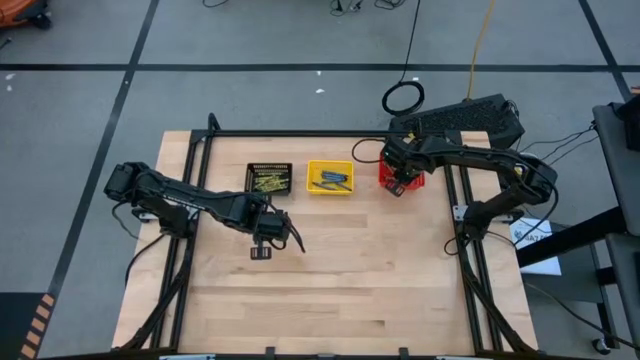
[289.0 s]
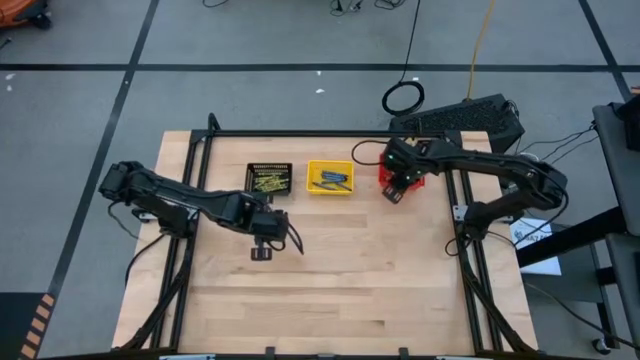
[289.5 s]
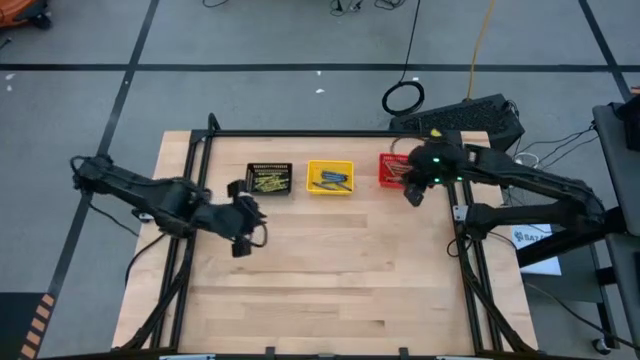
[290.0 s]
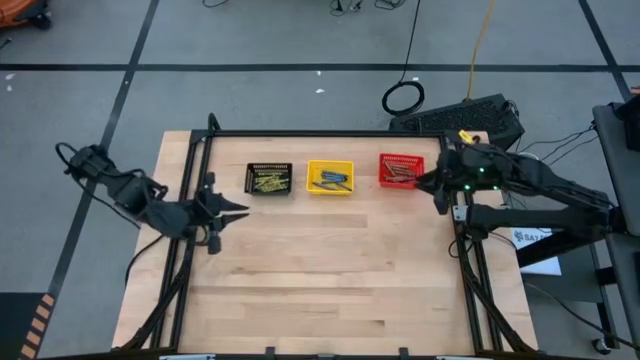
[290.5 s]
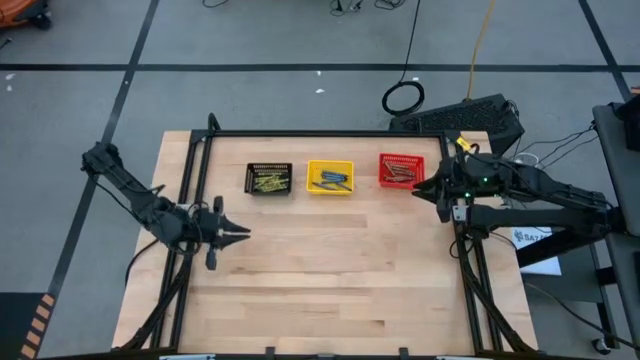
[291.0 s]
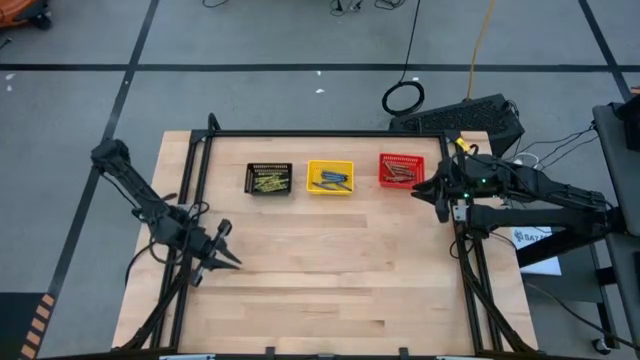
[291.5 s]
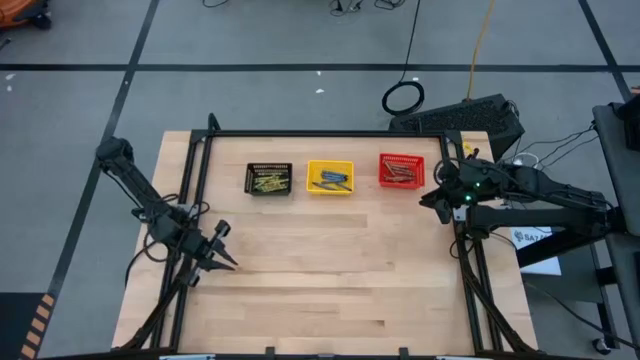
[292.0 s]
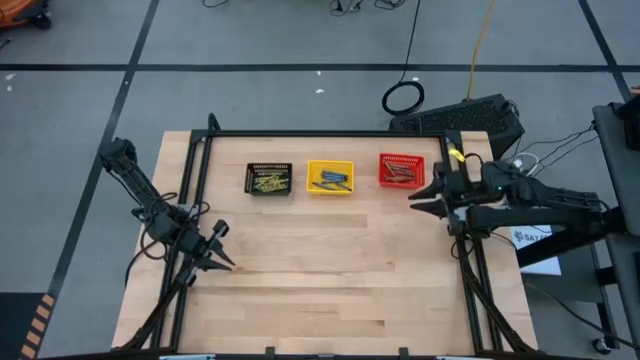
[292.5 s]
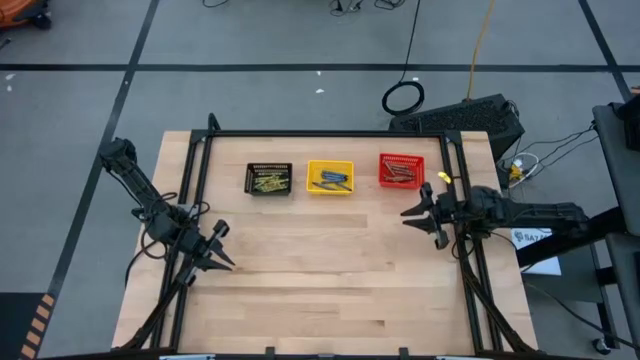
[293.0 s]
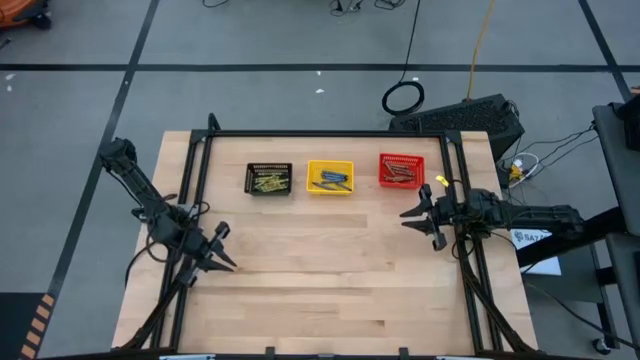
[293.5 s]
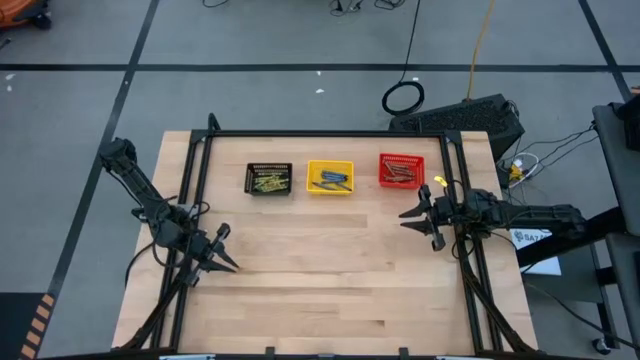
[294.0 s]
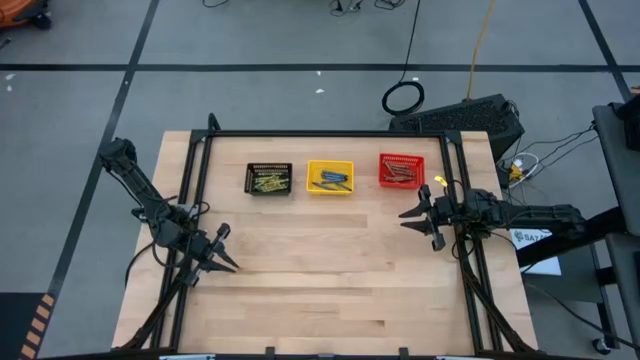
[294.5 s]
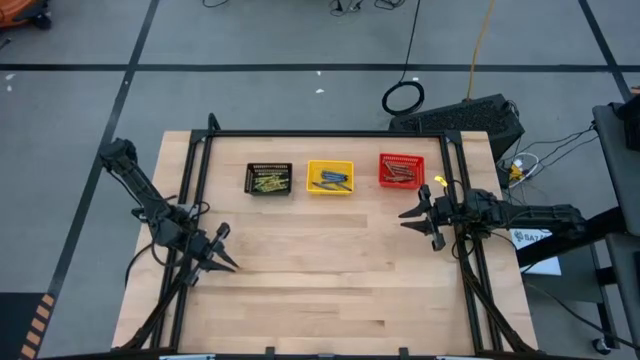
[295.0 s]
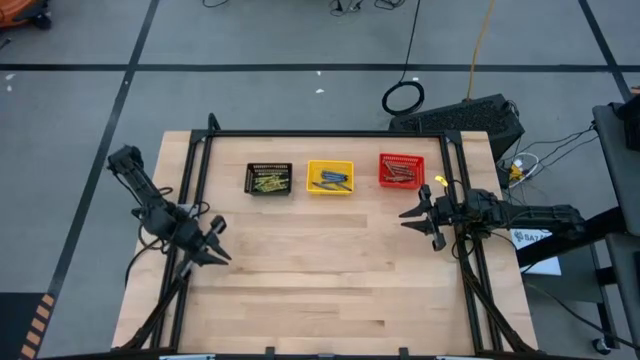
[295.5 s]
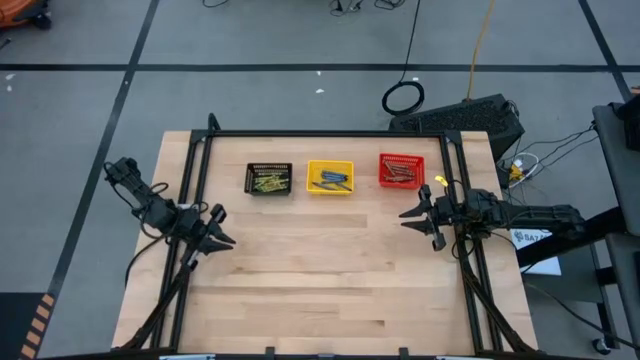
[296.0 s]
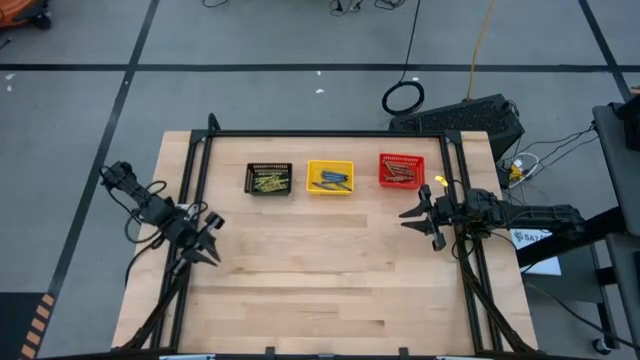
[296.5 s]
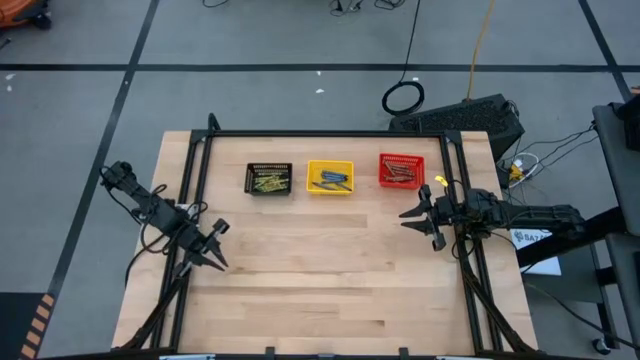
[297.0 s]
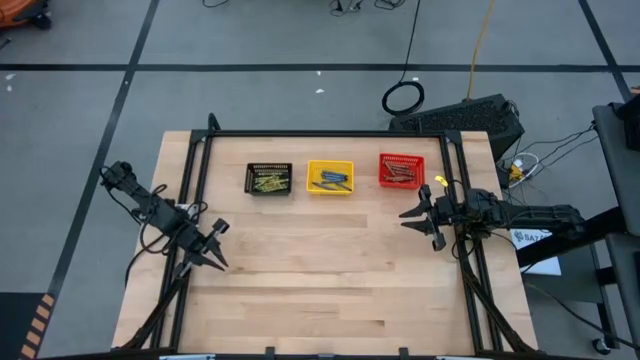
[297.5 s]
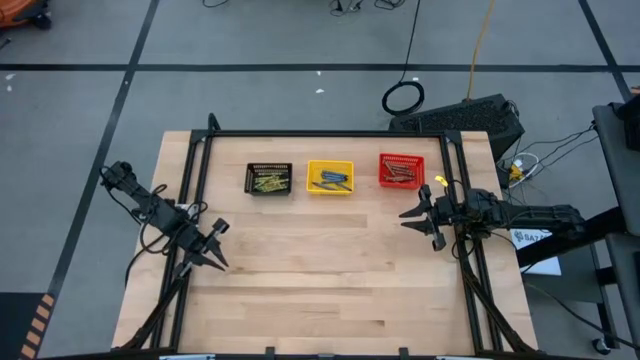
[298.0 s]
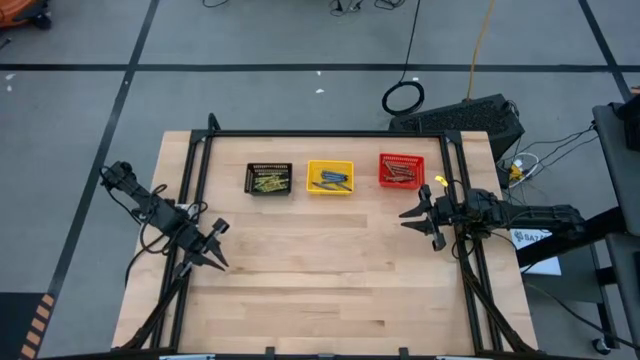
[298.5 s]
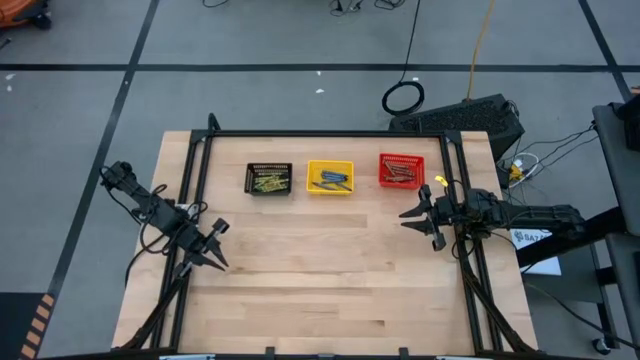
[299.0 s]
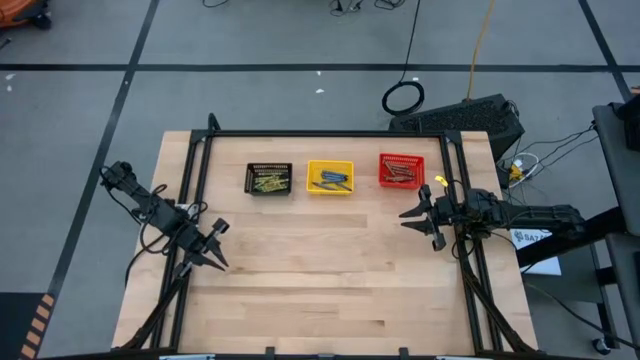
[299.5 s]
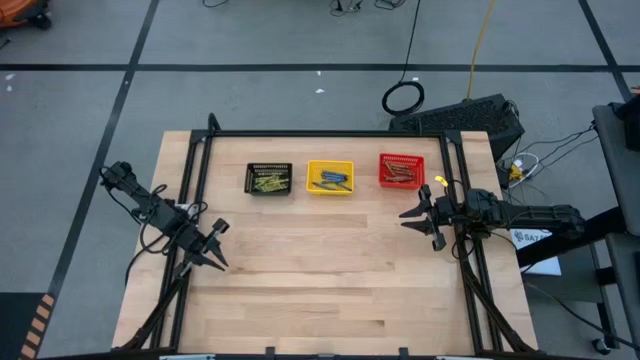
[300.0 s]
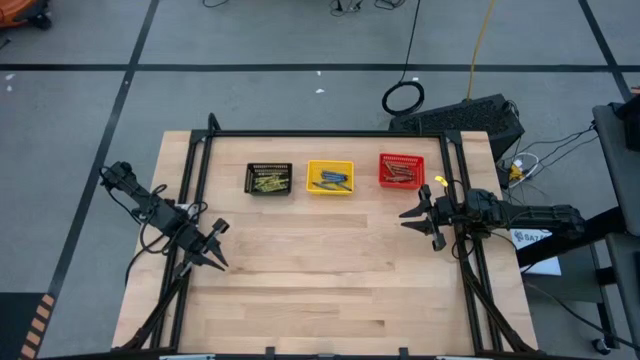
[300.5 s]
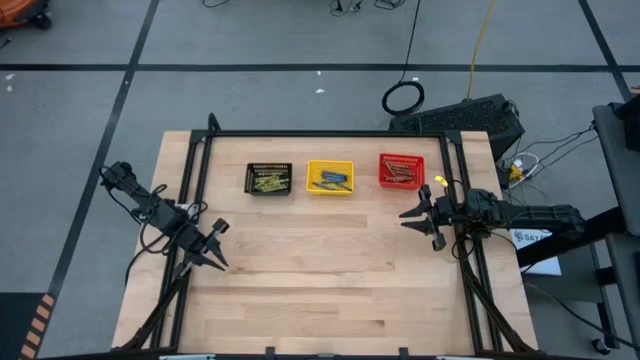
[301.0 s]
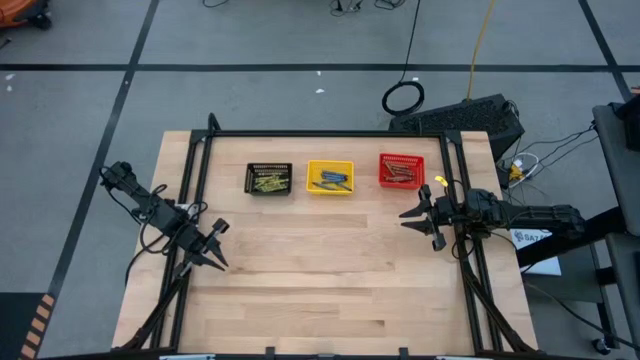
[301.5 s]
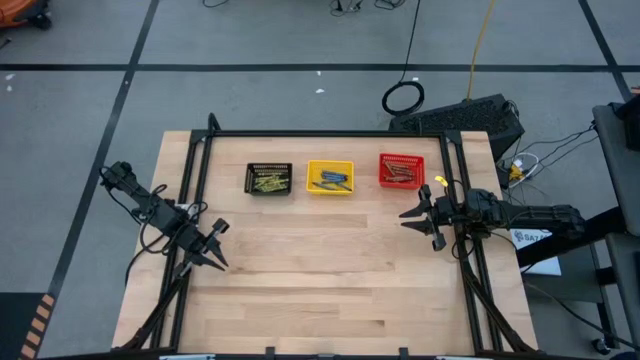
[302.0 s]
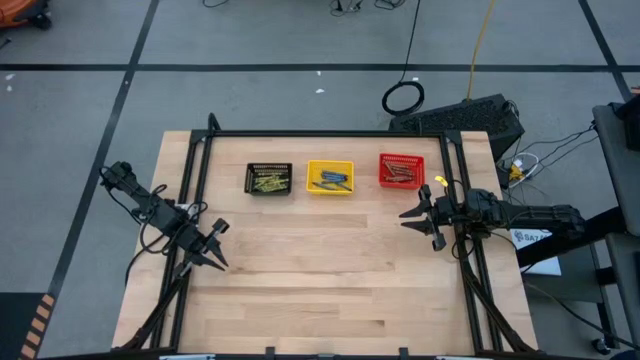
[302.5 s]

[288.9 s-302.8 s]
Task: Sort crayons
Return to Home Position

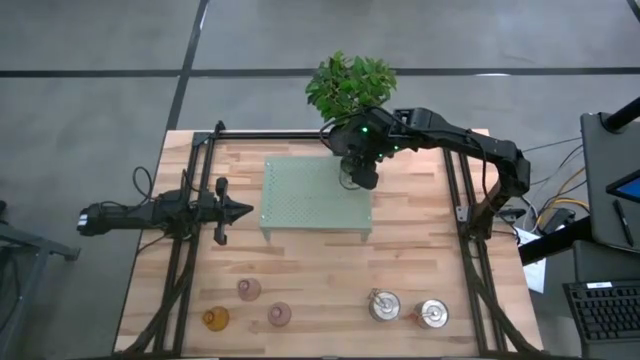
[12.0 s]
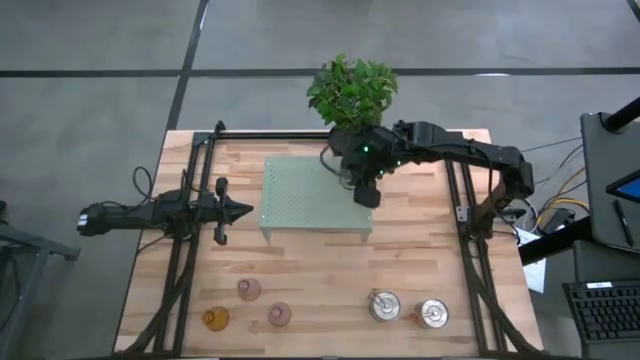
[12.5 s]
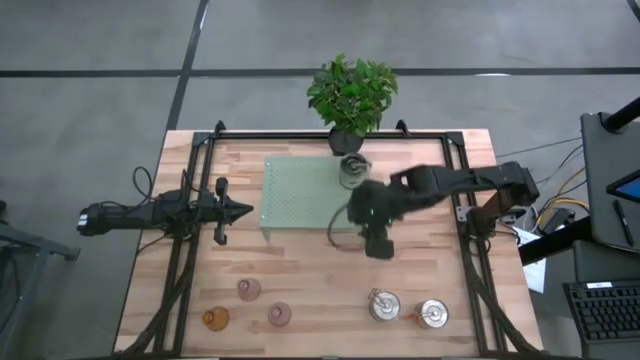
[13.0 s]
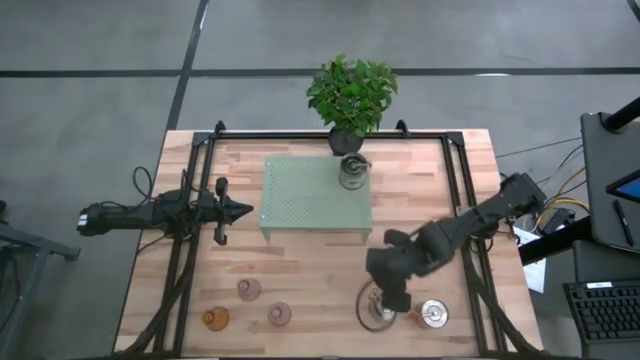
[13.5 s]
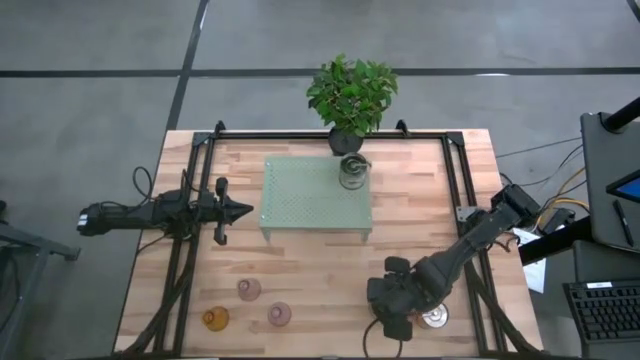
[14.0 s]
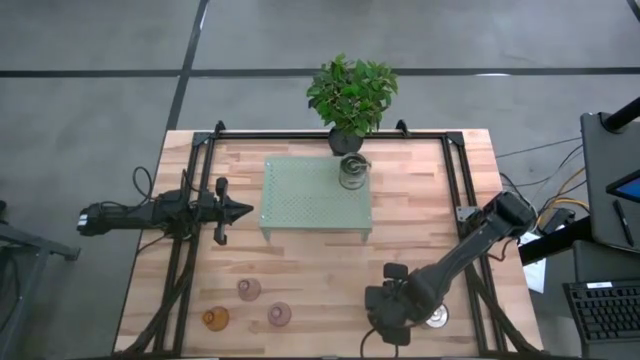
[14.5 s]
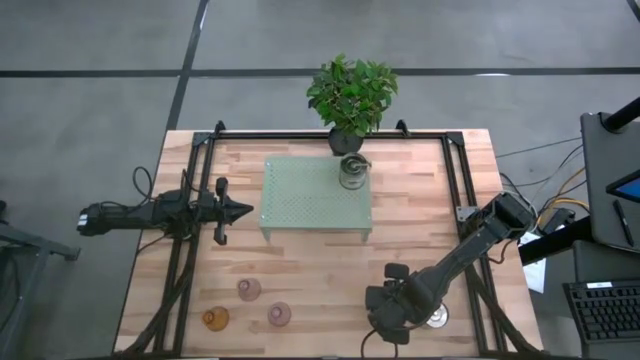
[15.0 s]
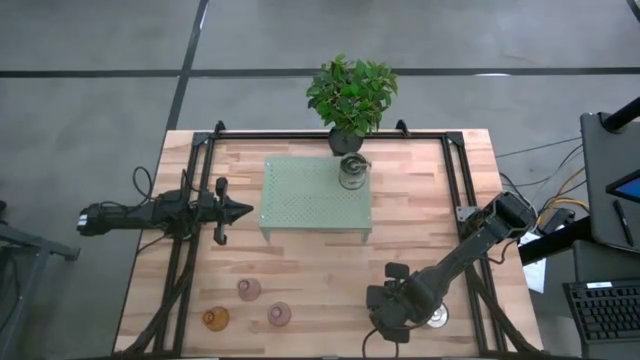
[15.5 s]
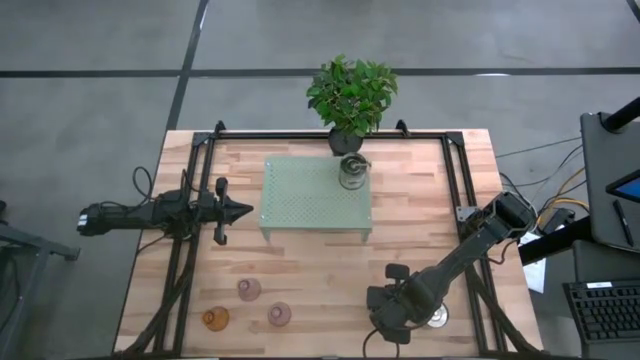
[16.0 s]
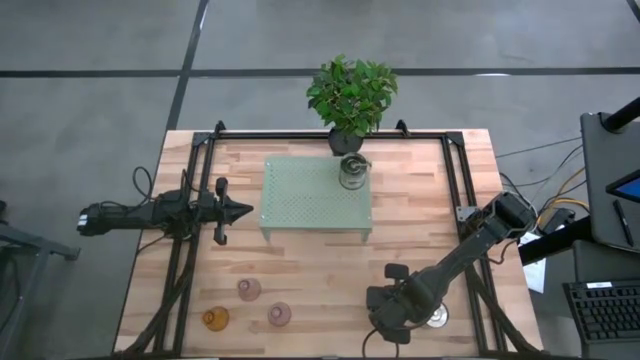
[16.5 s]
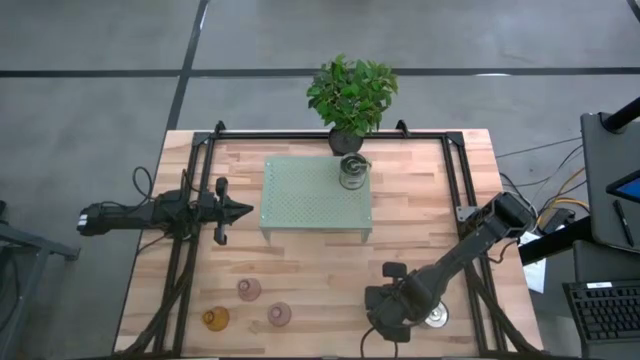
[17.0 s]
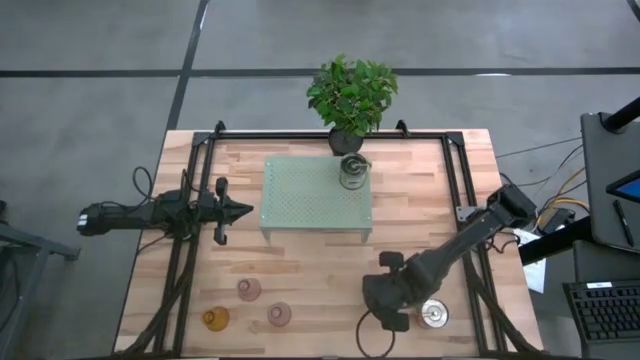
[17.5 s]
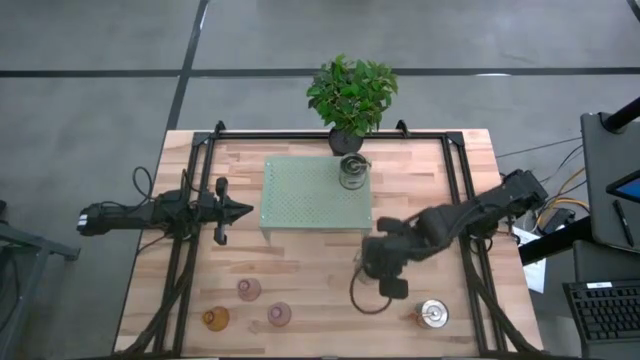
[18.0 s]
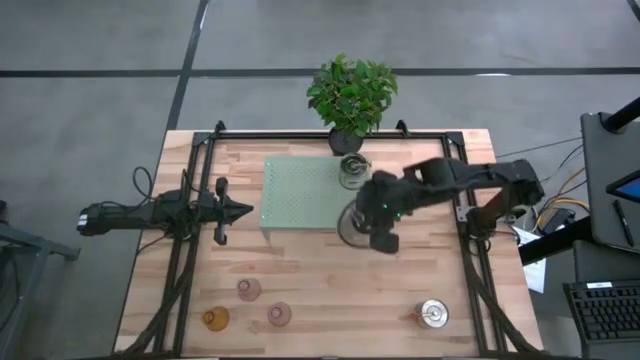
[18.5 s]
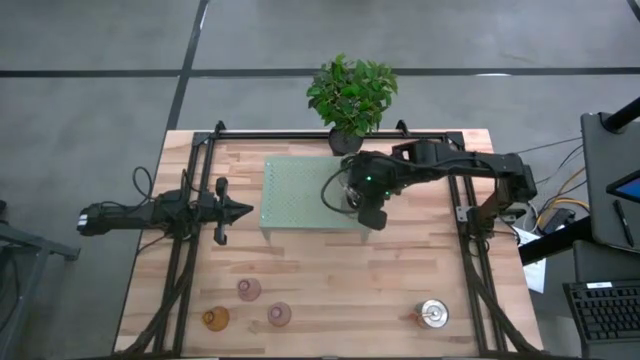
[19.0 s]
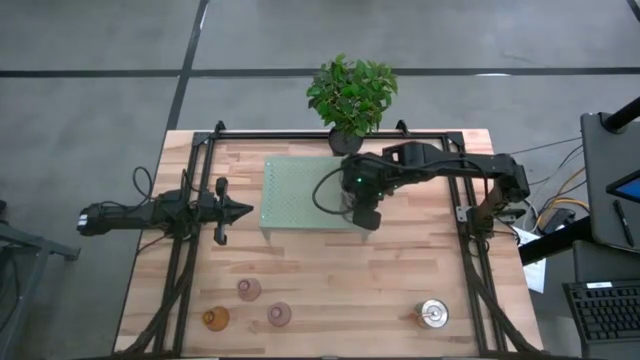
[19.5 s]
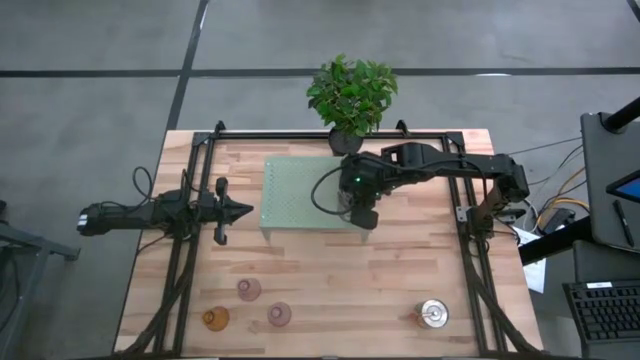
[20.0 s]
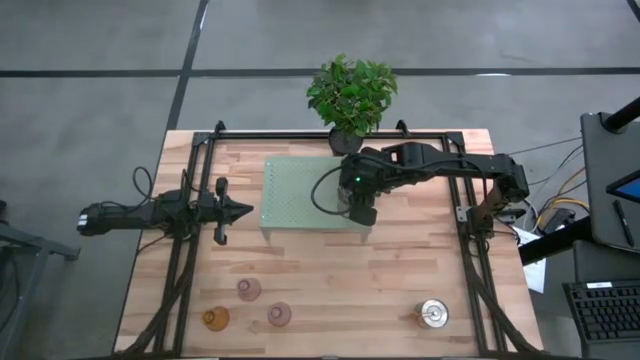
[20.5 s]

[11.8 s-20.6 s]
Task: Pick & Place candle stick holders
Put the silver scented candle on the shelf
